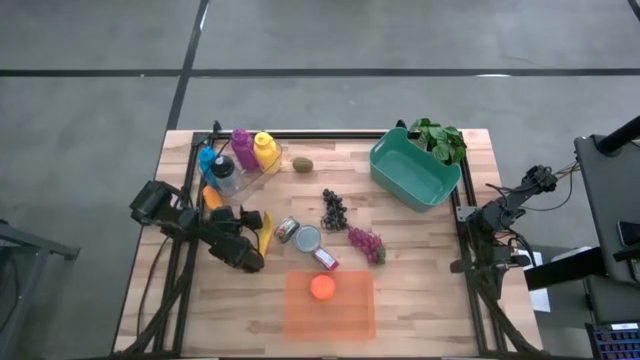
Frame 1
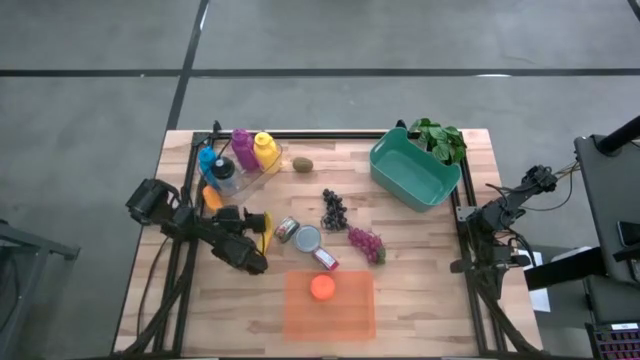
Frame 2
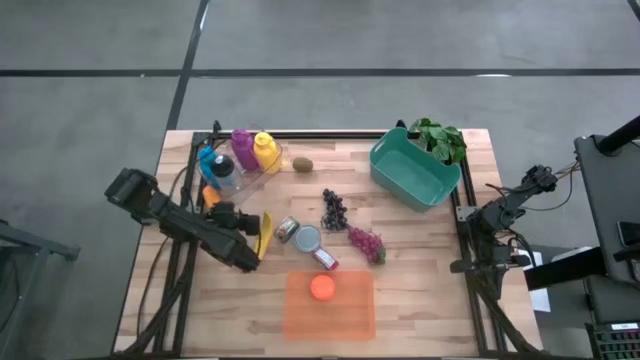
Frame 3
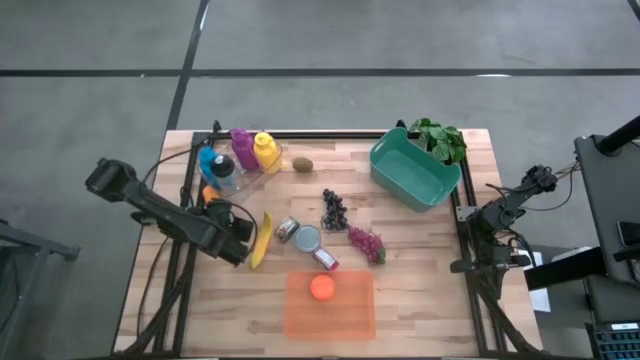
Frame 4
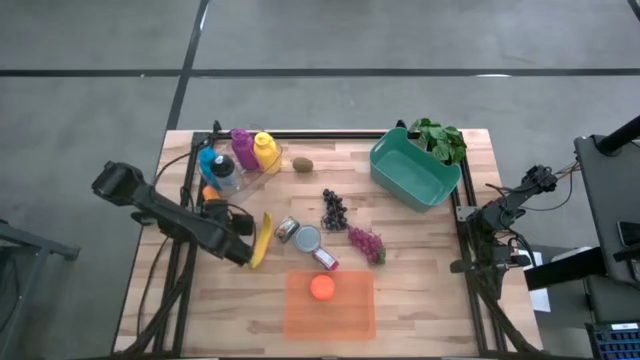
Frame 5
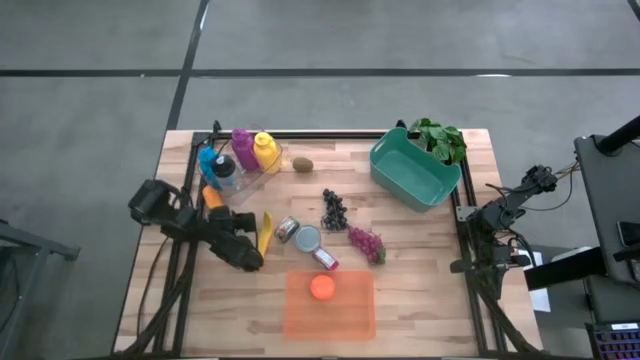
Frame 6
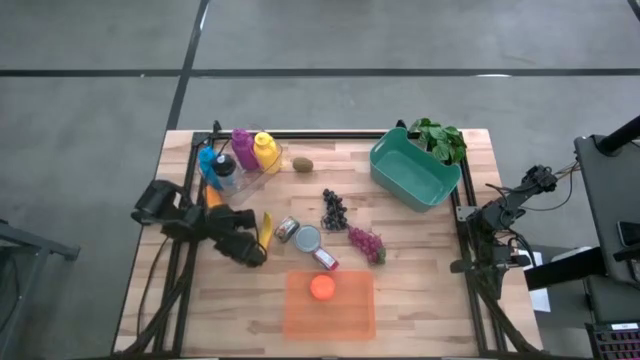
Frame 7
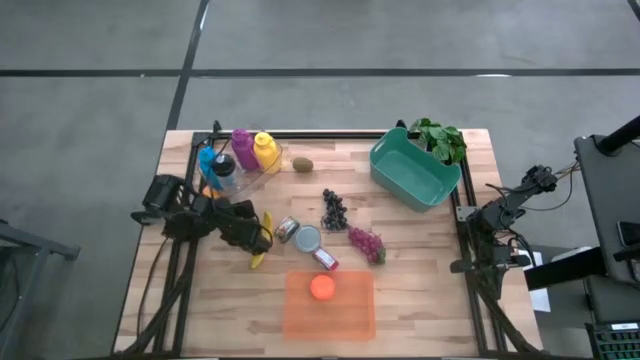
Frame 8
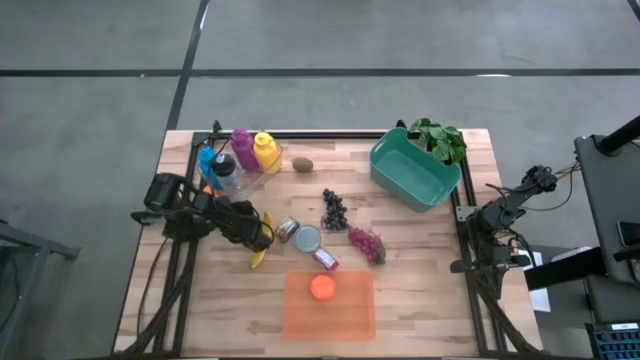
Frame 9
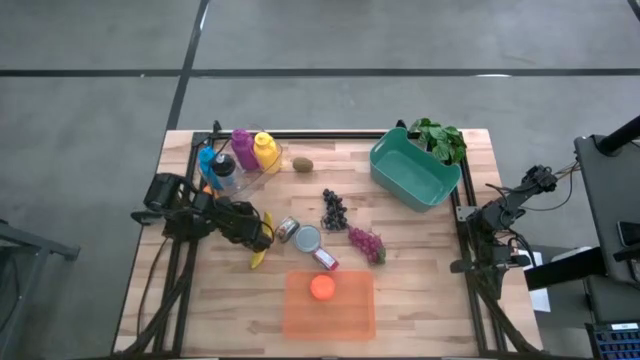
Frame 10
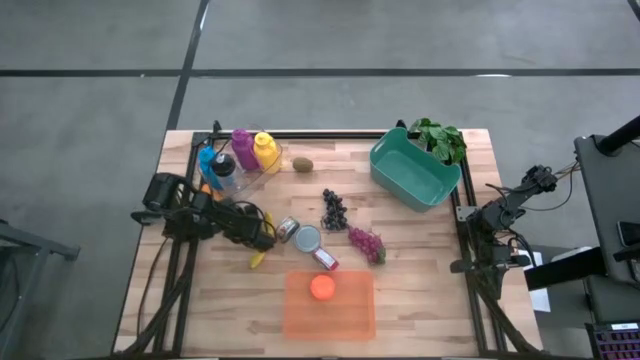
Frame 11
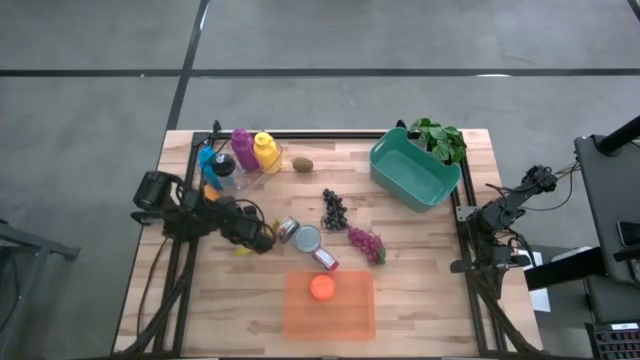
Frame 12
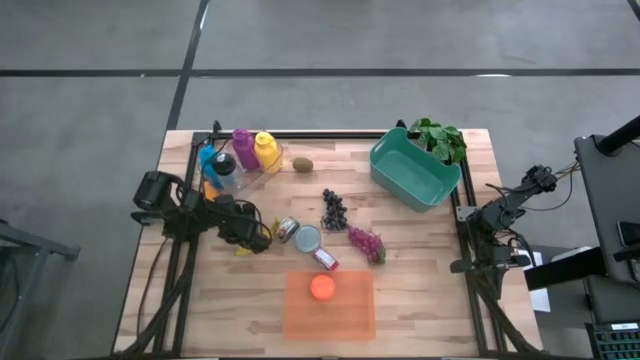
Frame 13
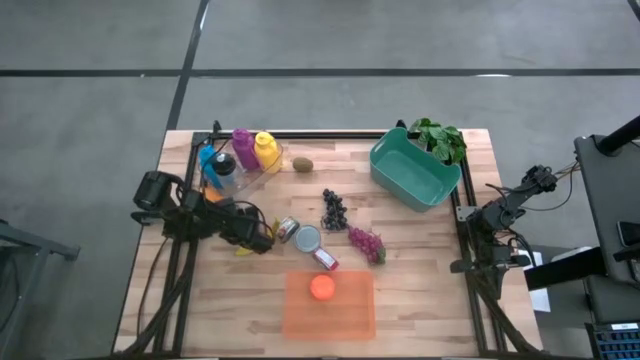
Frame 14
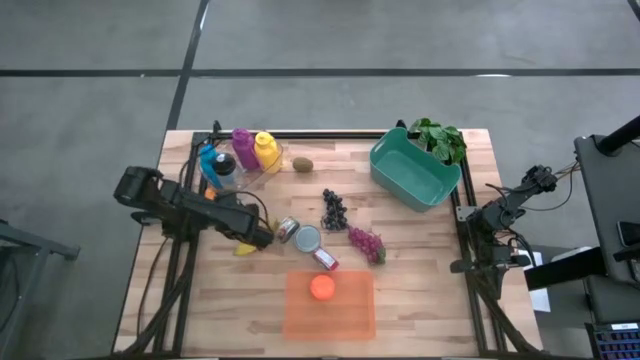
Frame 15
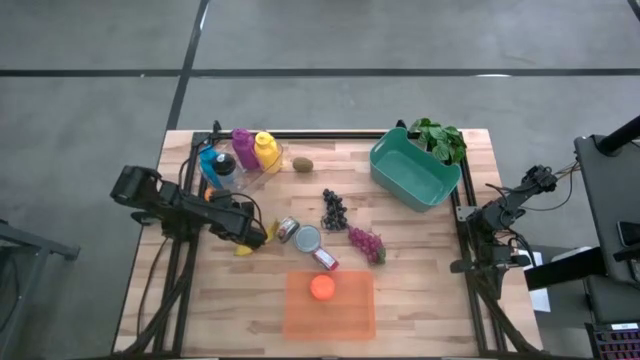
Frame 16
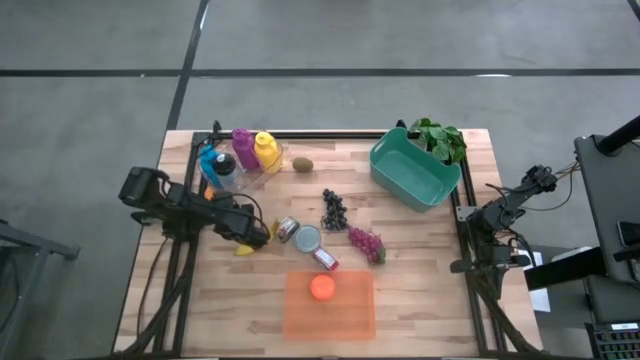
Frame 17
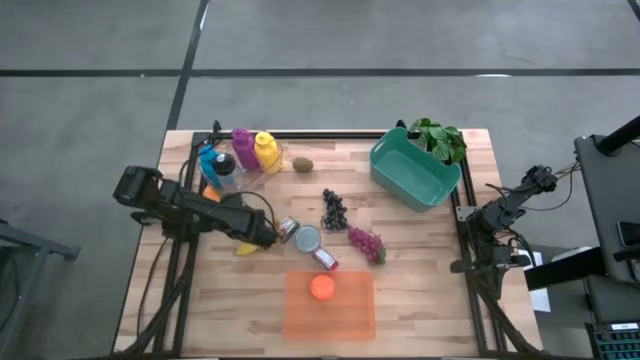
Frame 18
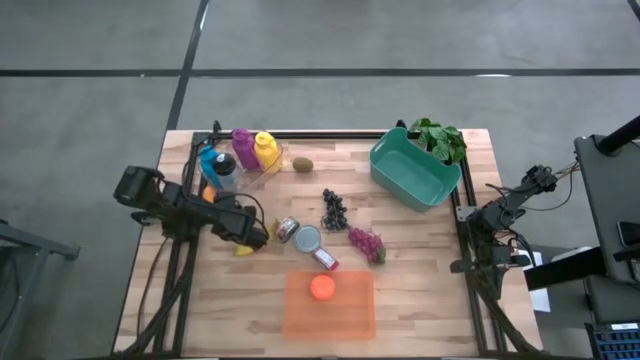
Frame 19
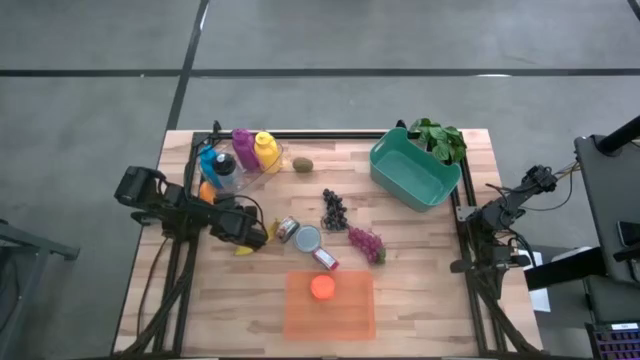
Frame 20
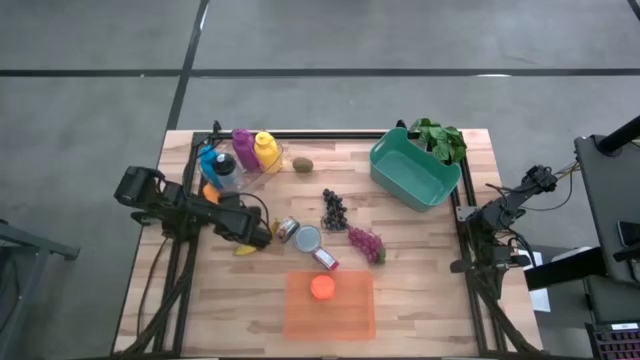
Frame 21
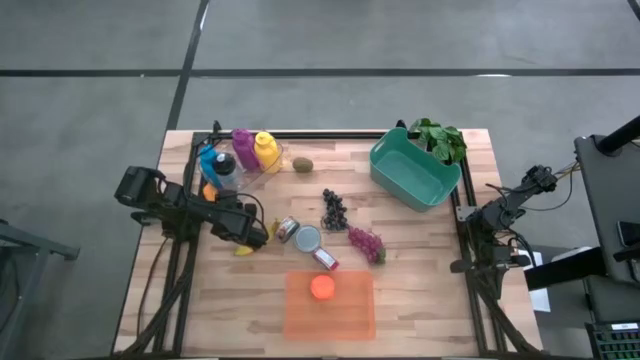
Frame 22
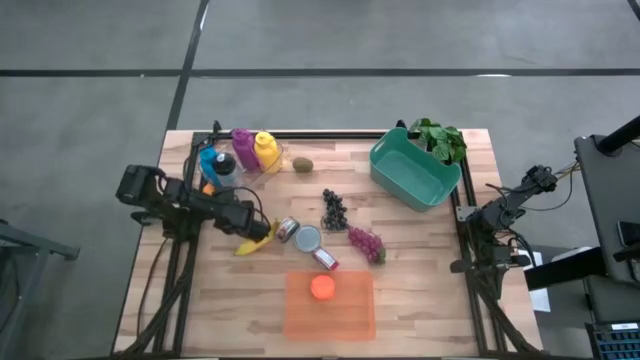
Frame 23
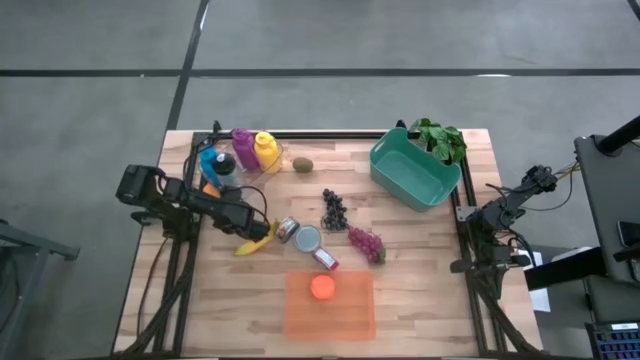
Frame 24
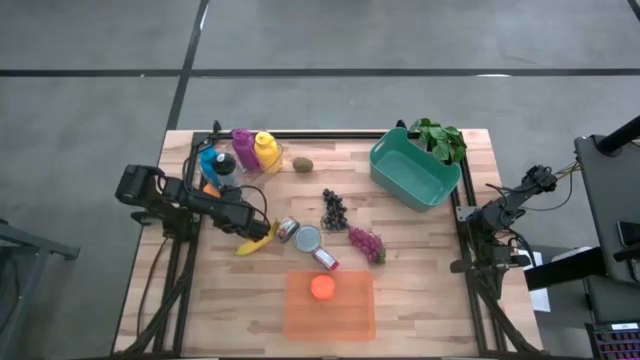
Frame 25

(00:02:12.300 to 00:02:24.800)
Task: Pick & Place Food Item
Put the yellow mango into the orange bin

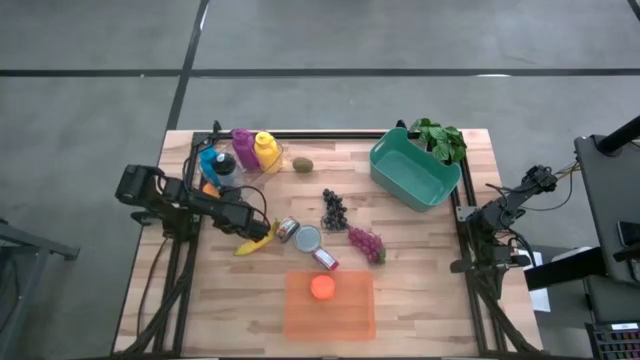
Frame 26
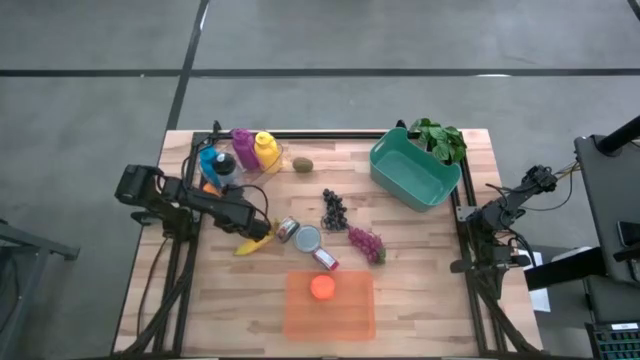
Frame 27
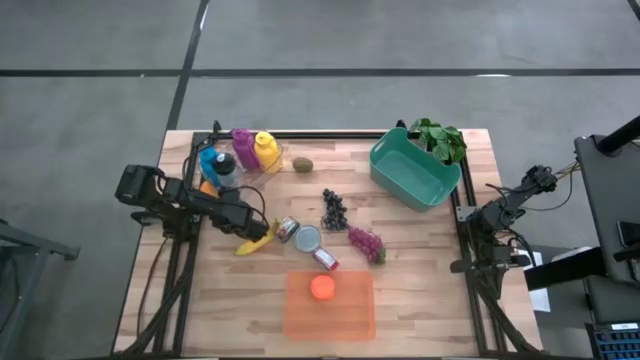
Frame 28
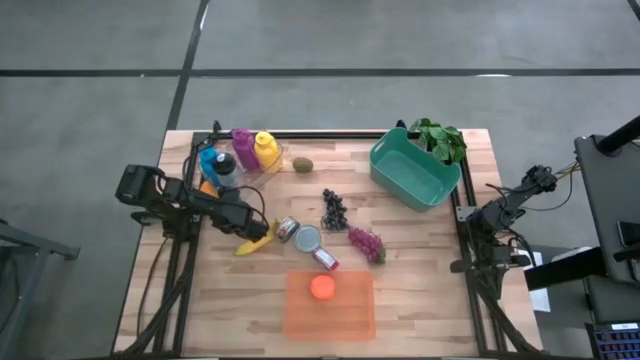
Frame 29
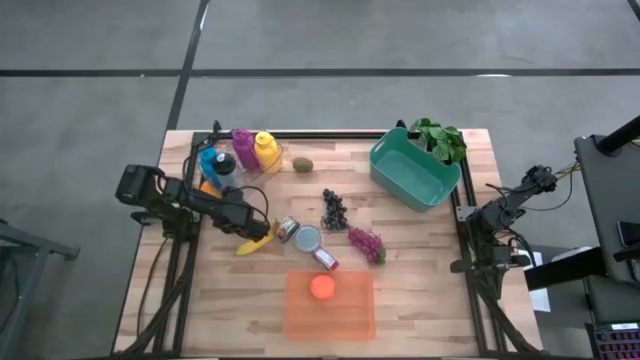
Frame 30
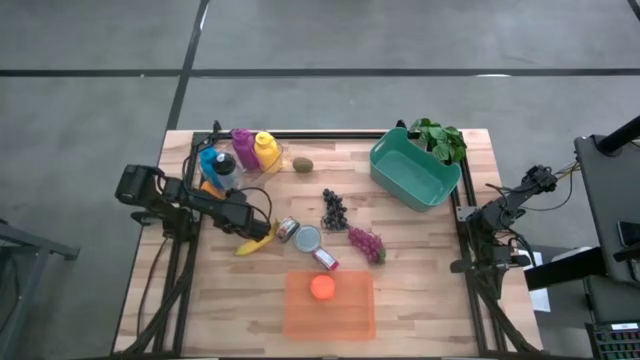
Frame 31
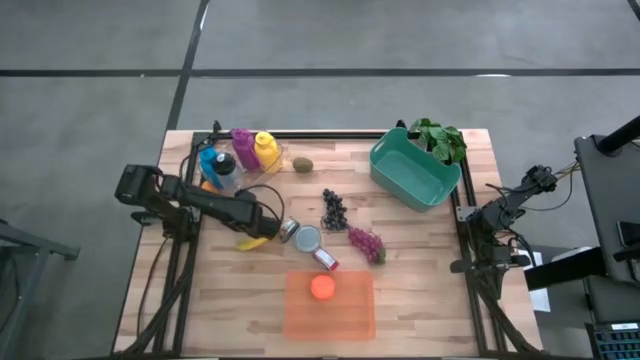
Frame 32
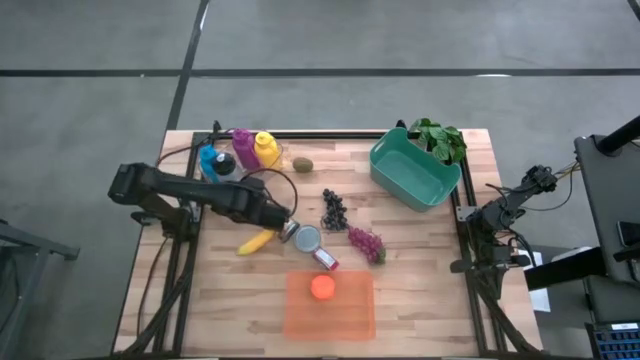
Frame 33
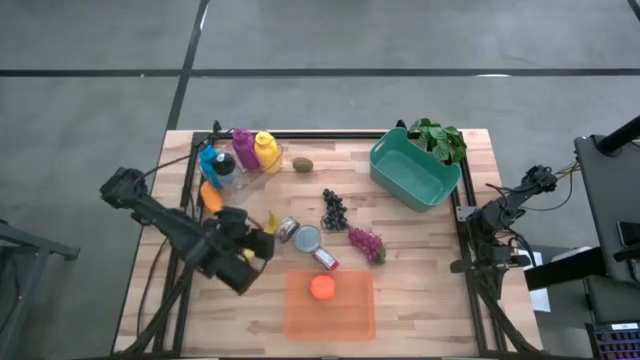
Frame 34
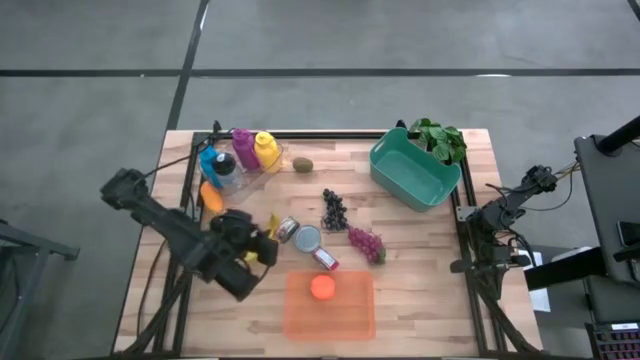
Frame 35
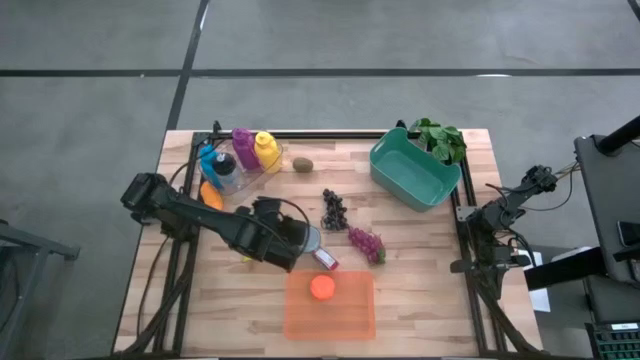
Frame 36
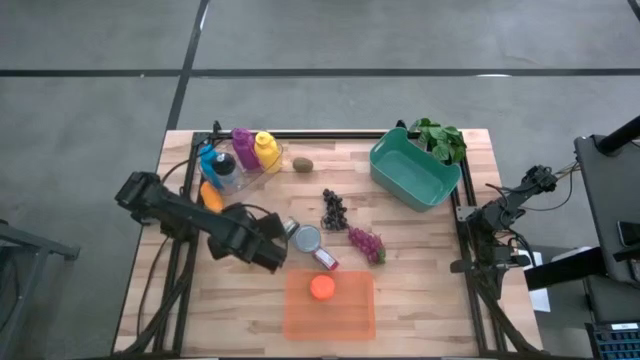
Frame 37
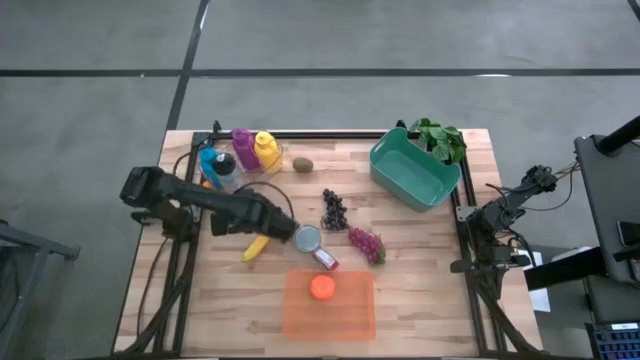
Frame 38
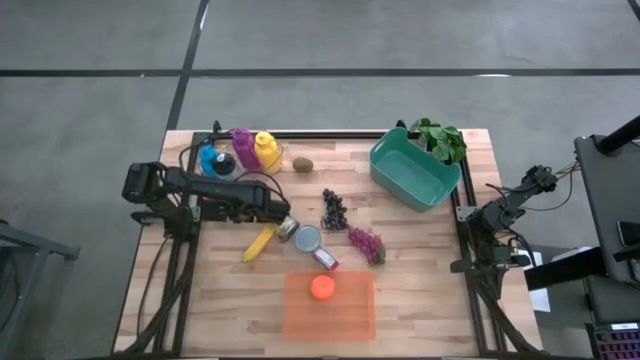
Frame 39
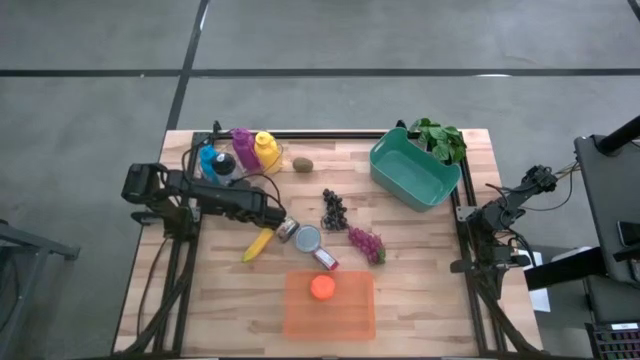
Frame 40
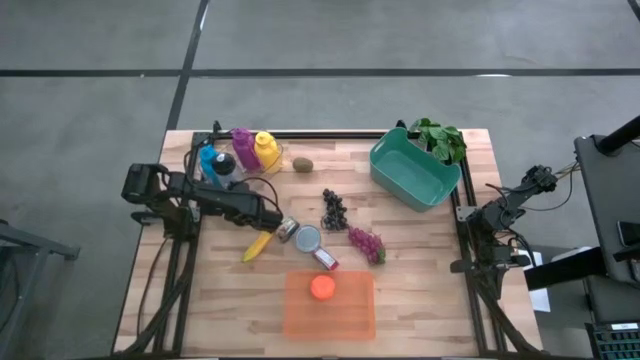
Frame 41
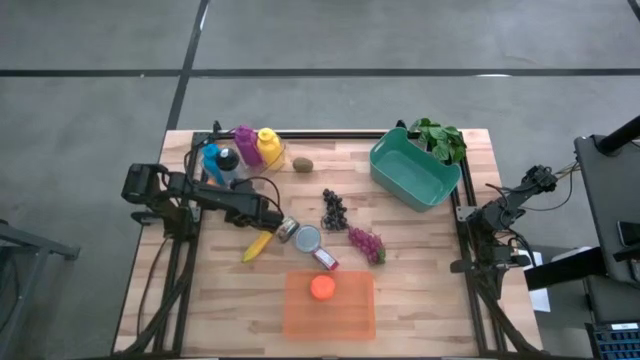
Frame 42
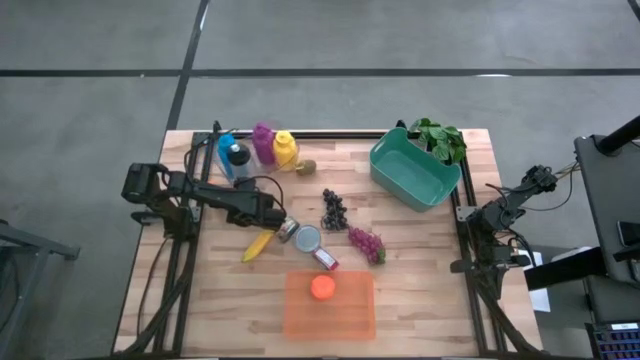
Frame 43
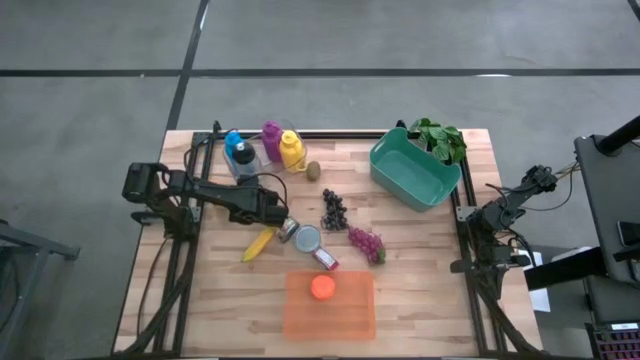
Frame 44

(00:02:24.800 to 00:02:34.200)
Adjust the transparent bin
